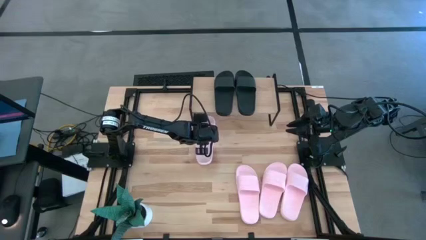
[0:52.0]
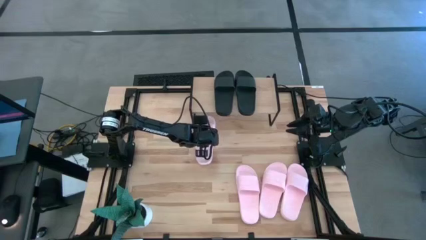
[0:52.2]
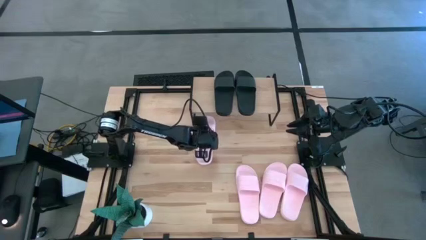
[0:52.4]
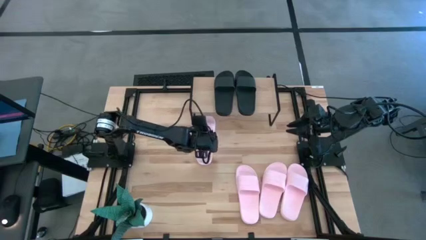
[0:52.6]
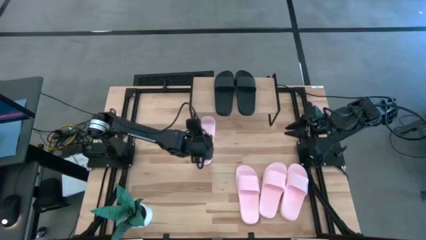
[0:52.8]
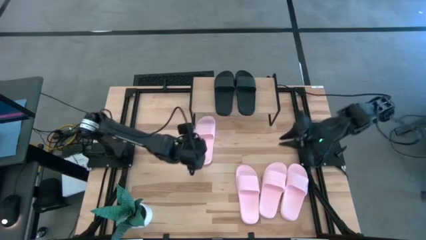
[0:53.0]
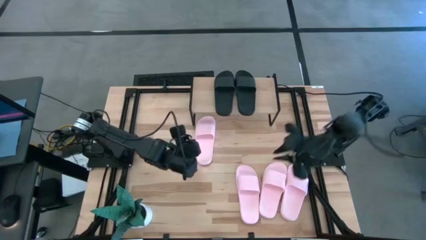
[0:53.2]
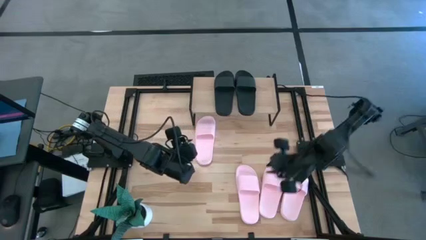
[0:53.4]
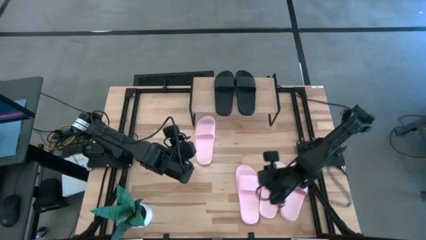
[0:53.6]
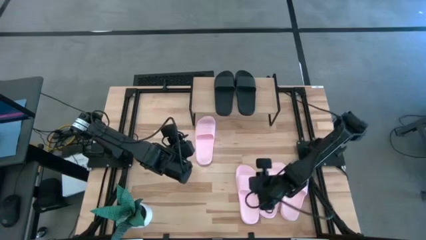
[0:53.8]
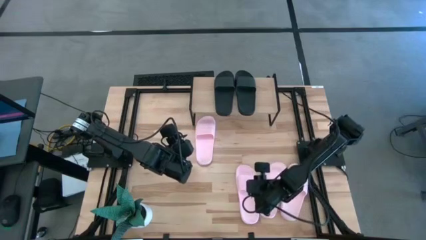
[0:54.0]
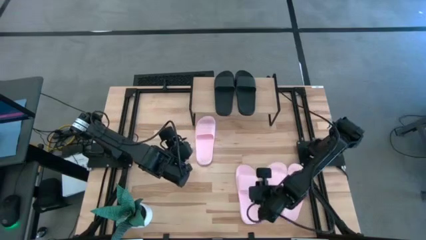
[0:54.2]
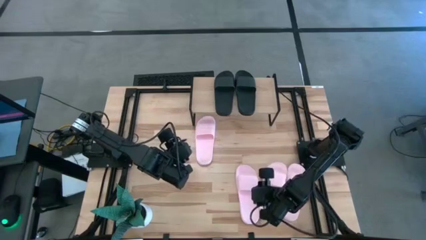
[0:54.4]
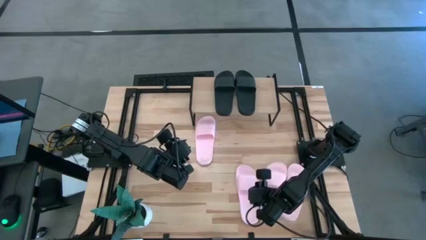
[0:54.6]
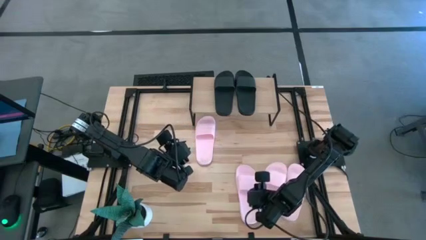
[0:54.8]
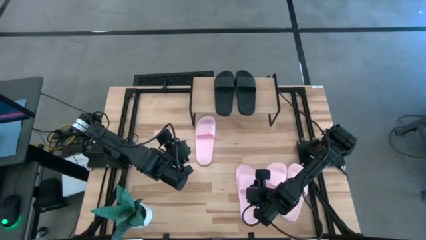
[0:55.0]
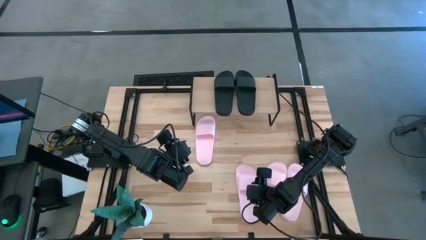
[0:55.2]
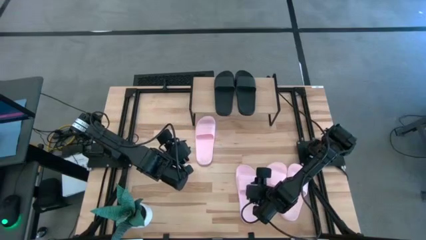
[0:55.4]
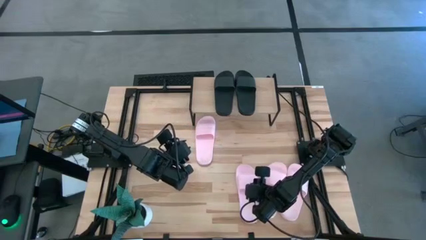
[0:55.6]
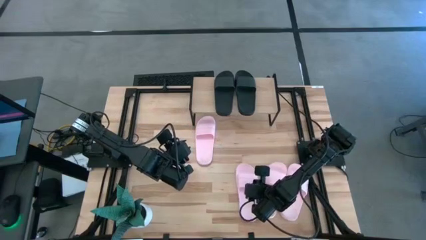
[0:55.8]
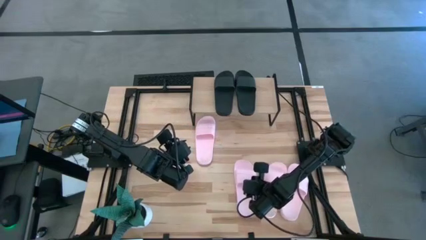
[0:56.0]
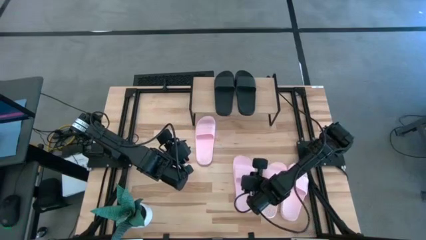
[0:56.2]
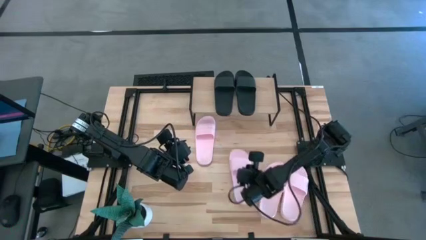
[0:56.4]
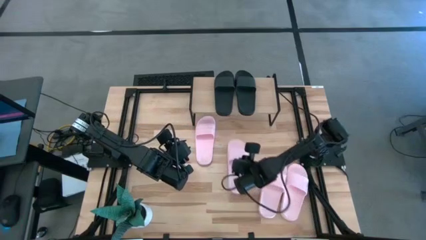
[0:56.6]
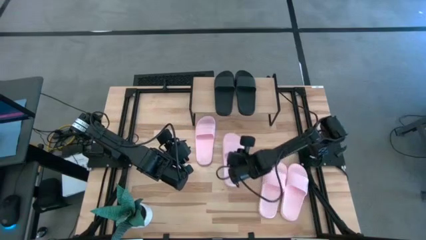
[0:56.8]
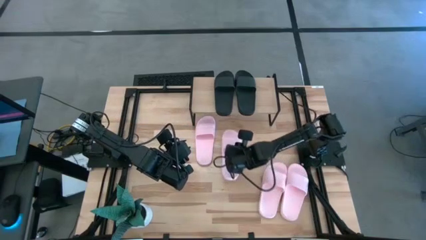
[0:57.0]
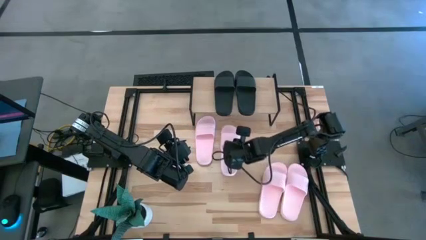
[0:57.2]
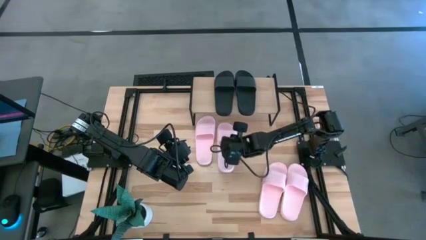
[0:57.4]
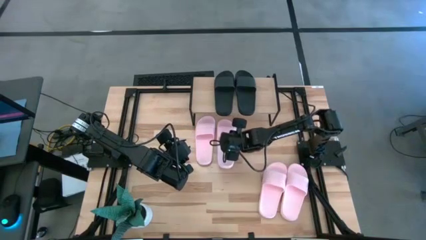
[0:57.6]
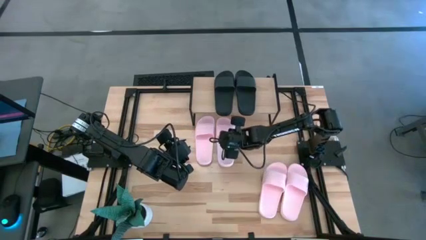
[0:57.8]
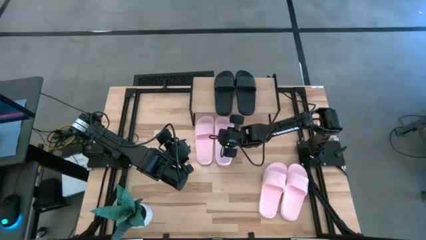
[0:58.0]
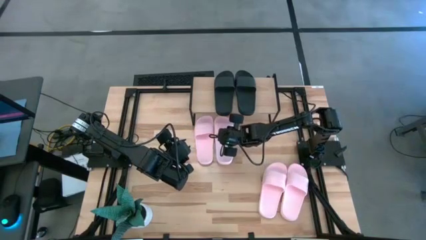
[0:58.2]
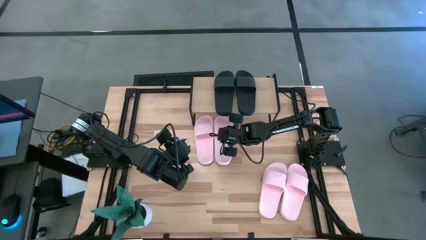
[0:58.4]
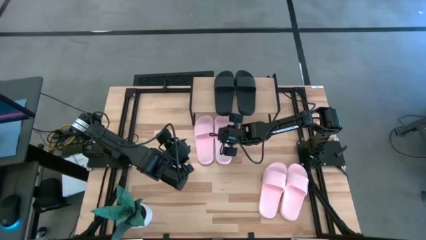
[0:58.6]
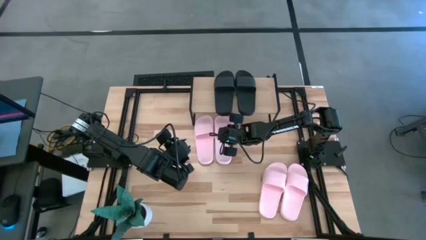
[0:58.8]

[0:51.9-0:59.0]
Task: Pick and place slides into the shelf
Put the pink slipper under the shelf

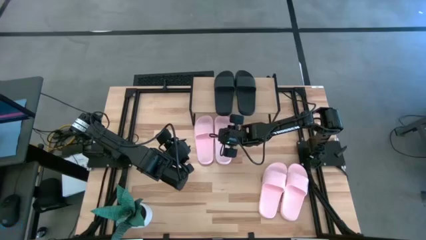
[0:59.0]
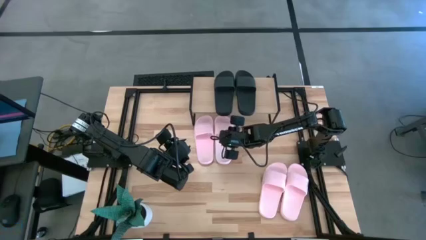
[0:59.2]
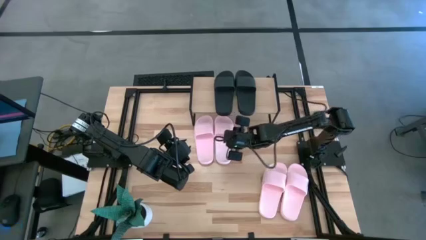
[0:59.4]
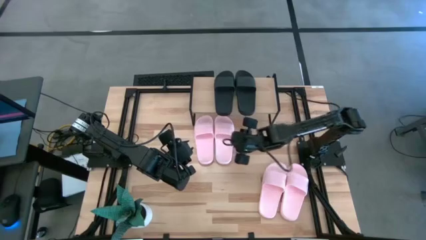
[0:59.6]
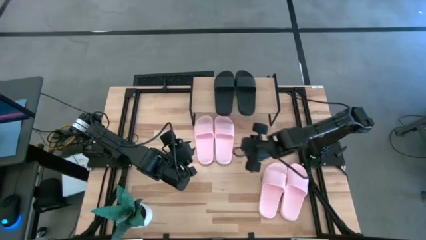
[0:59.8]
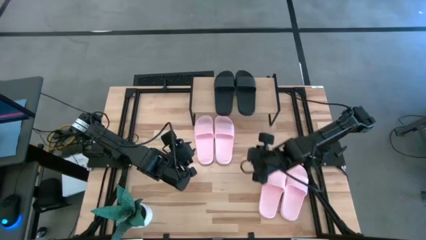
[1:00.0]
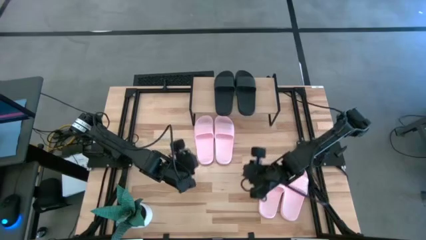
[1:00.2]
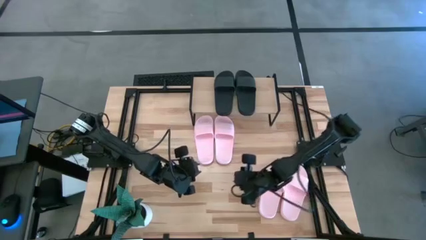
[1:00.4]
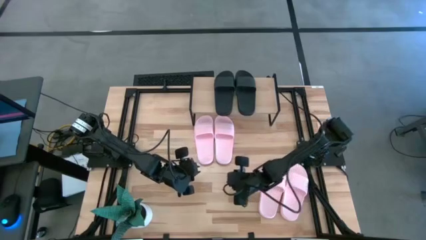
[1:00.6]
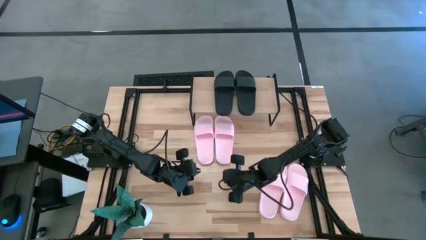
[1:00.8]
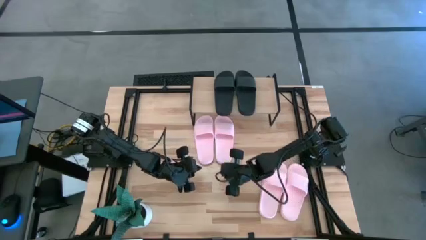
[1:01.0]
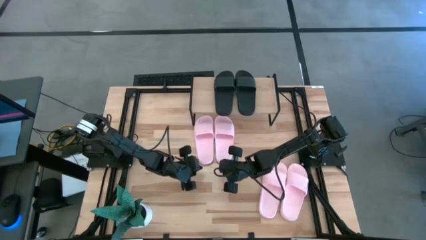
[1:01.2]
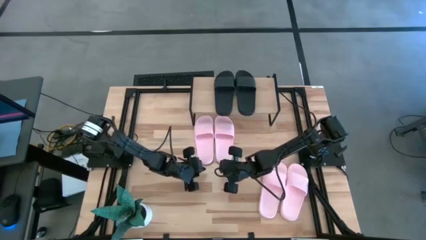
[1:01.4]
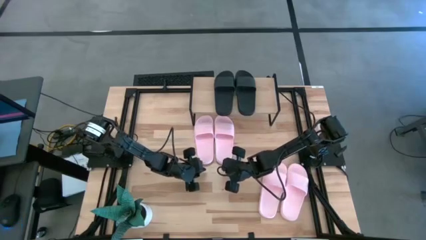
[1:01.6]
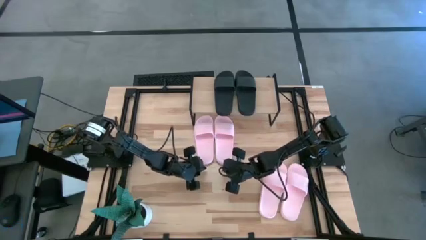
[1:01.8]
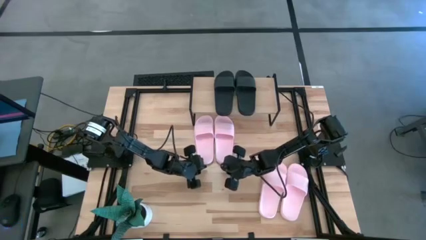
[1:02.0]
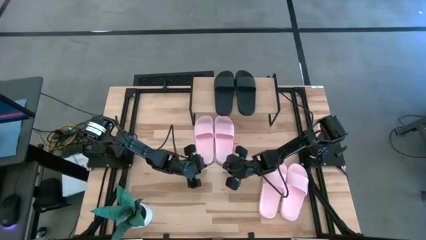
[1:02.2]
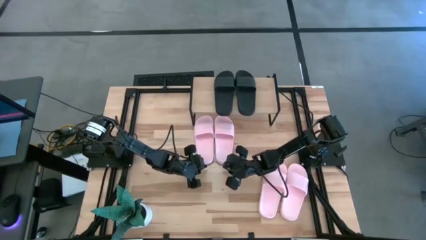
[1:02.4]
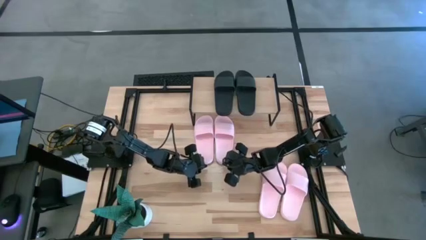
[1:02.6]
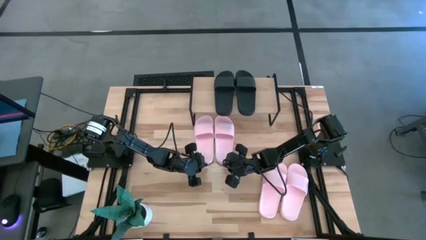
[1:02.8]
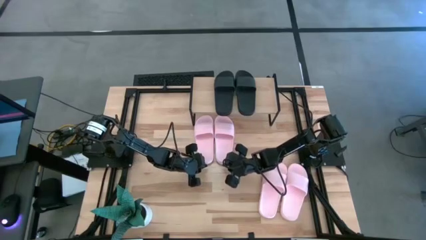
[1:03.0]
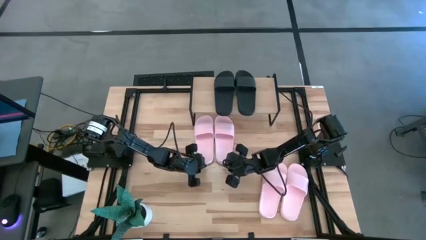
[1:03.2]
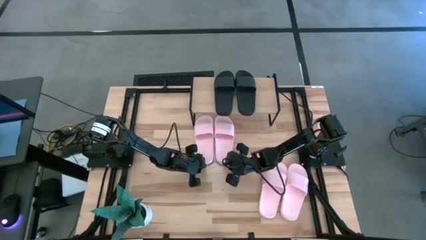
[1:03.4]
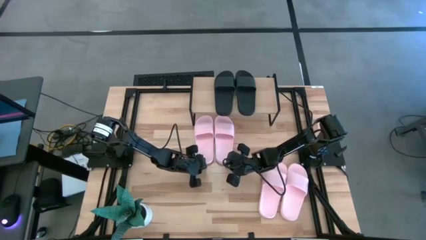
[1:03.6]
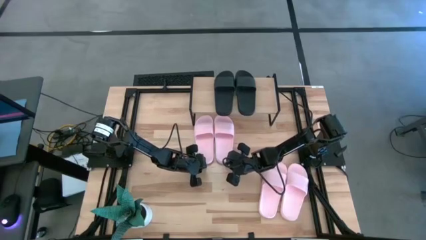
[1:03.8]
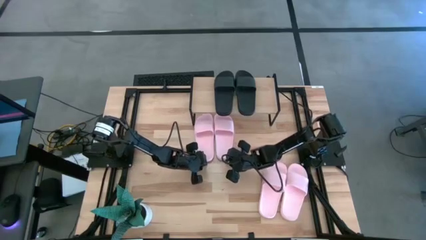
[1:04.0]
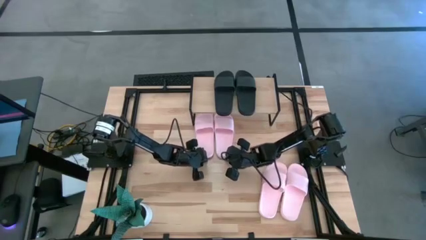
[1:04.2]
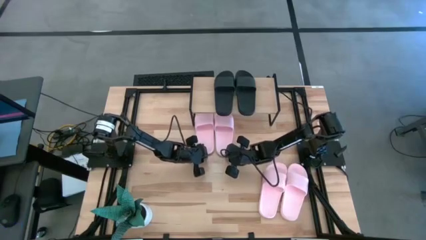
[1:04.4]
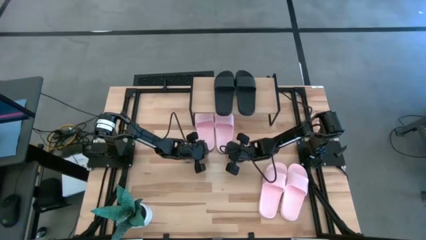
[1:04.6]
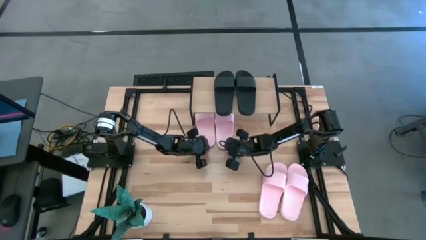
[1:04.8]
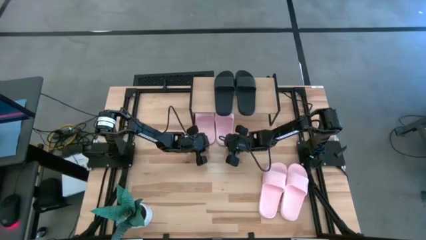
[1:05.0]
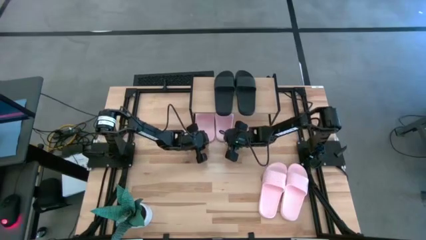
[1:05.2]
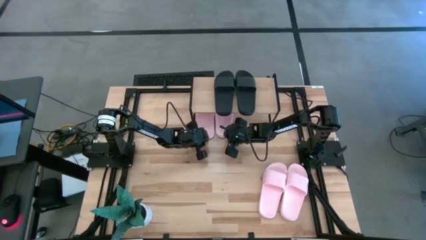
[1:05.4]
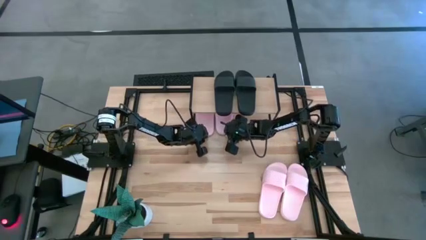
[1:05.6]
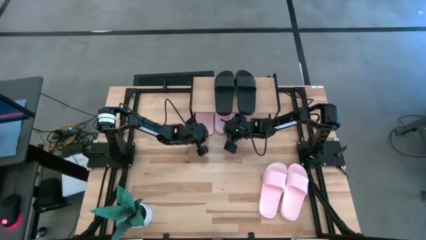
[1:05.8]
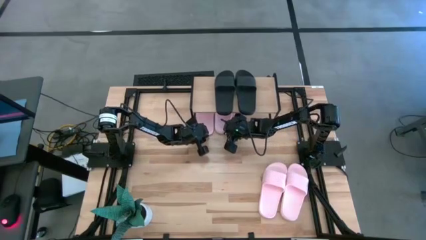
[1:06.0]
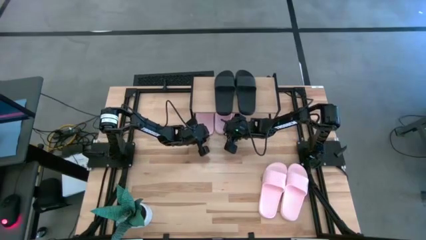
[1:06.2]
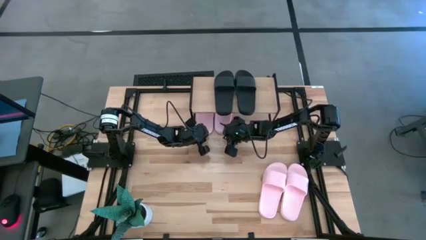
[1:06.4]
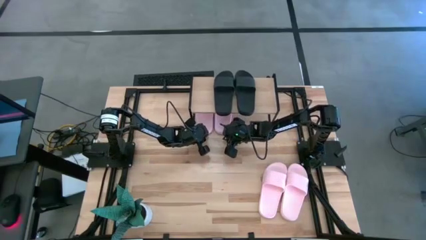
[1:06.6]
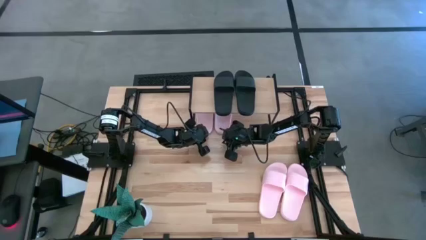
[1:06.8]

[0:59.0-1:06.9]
Adjust the pink slippers under the shelf

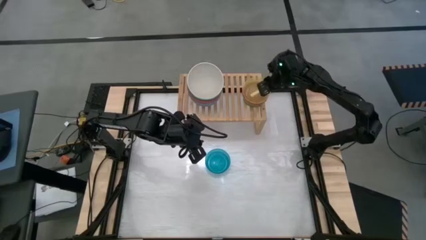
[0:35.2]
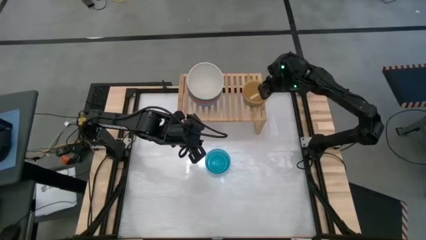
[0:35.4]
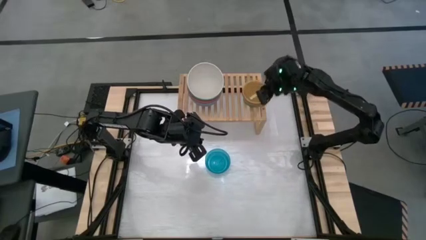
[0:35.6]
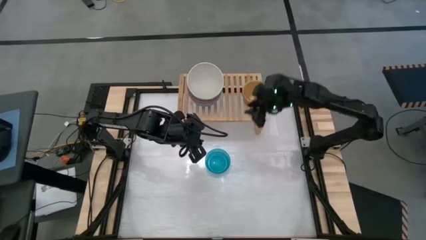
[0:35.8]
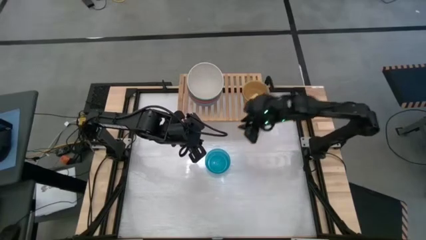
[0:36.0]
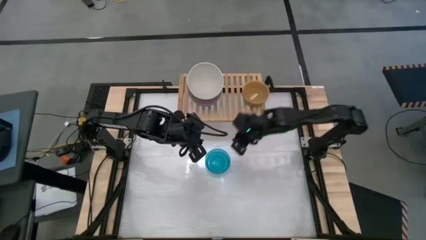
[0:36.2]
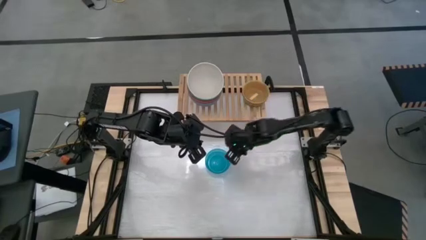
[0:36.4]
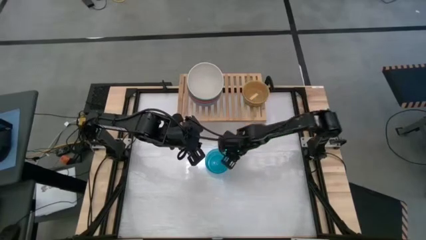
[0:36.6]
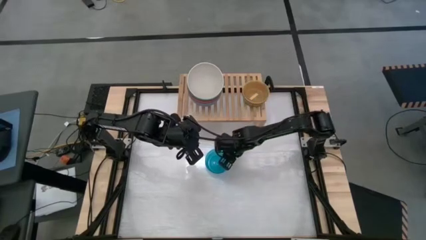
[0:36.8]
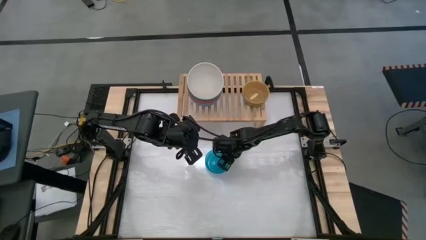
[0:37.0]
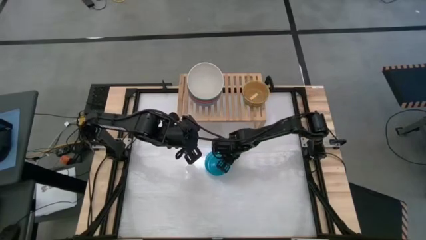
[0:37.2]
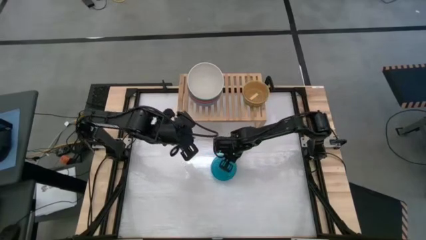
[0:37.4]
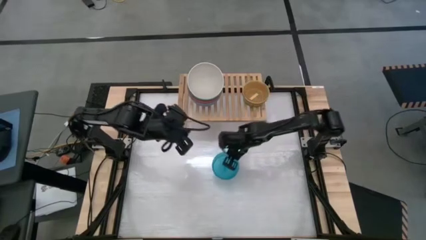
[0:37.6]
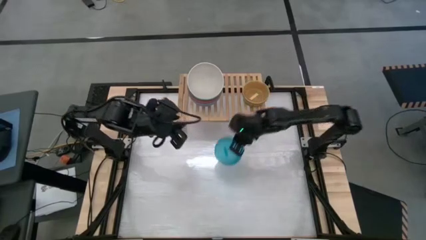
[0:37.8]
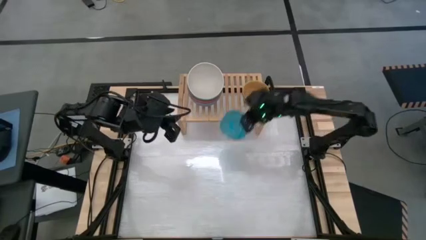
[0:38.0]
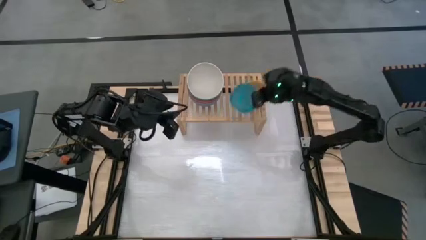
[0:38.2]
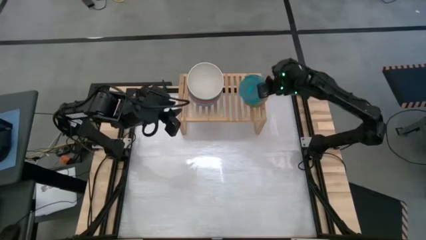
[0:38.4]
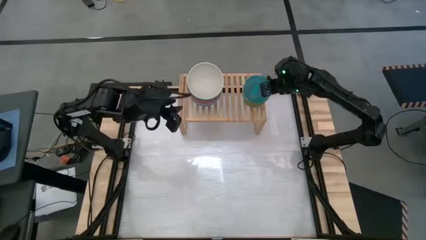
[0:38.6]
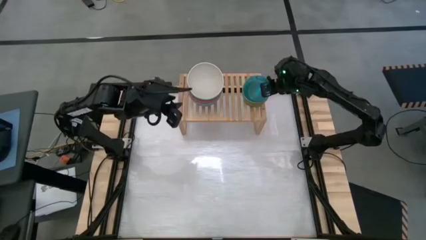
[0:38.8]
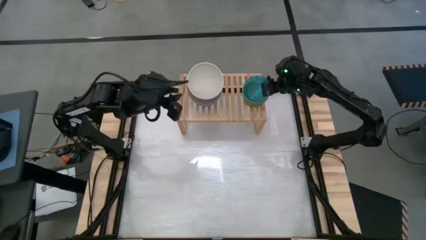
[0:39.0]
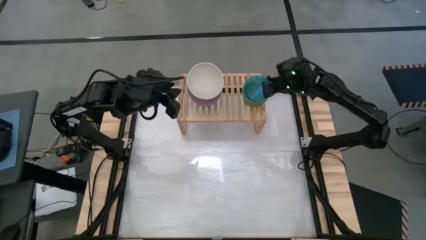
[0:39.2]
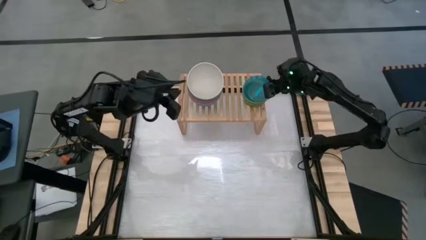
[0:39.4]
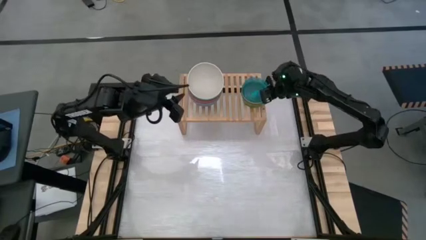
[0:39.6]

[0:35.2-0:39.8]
Task: Place and stack bowls onto a shelf
Stack the light blue bowl on top of the yellow bowl on the shelf
